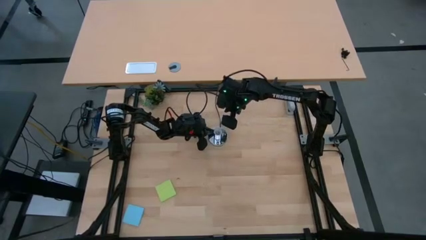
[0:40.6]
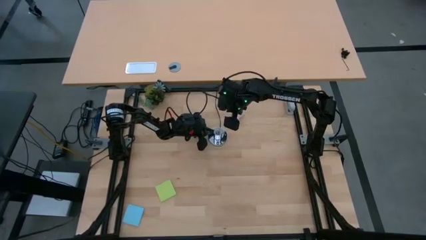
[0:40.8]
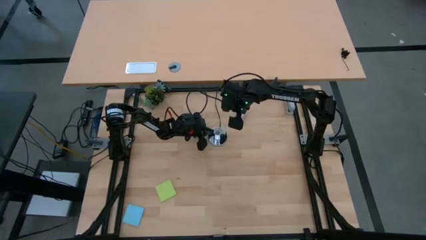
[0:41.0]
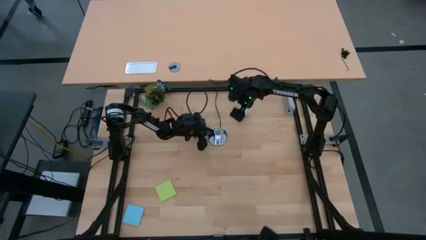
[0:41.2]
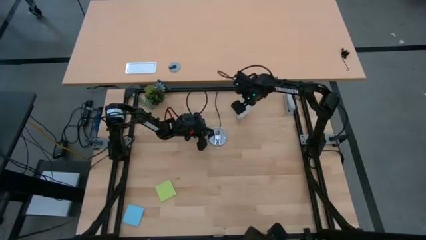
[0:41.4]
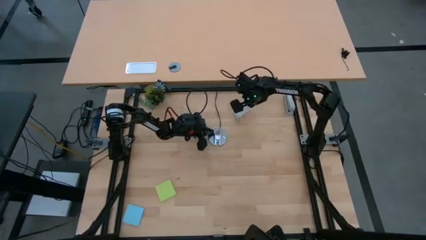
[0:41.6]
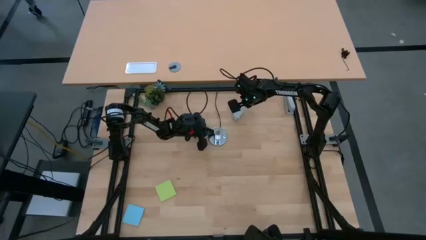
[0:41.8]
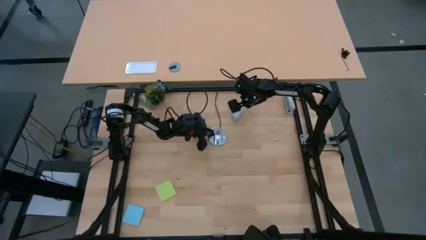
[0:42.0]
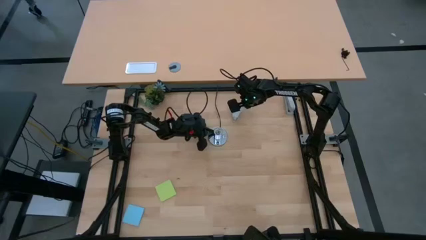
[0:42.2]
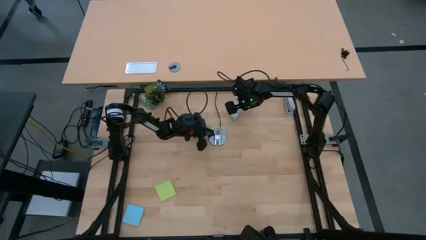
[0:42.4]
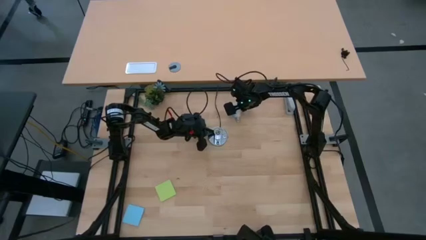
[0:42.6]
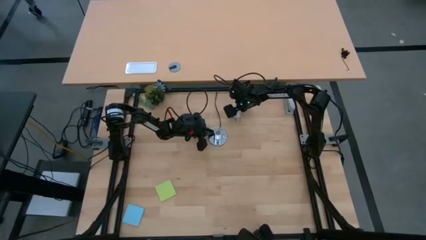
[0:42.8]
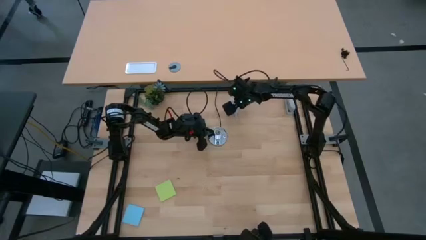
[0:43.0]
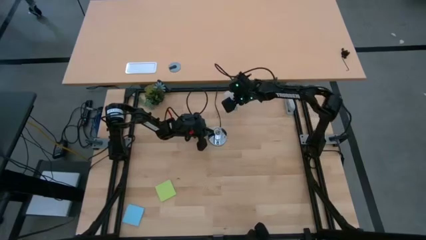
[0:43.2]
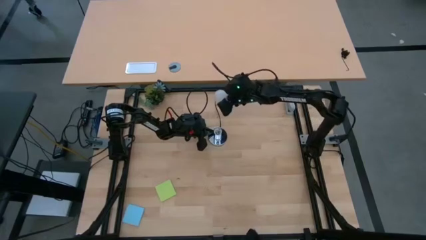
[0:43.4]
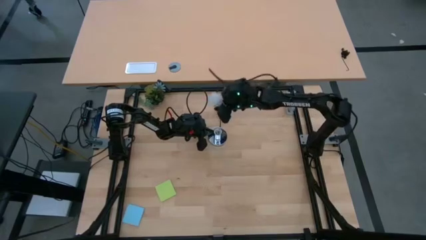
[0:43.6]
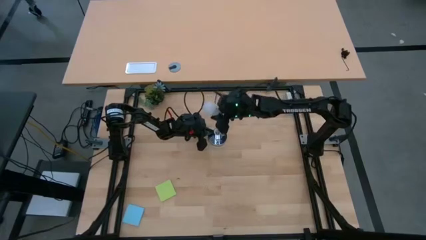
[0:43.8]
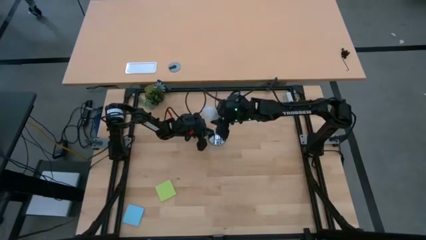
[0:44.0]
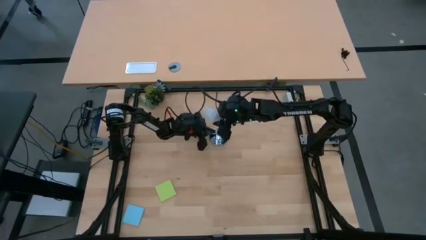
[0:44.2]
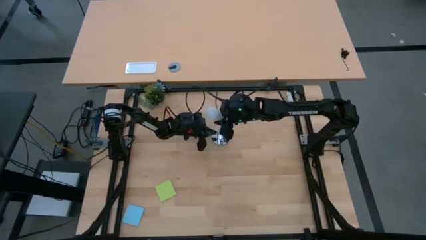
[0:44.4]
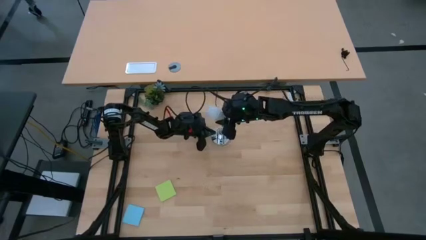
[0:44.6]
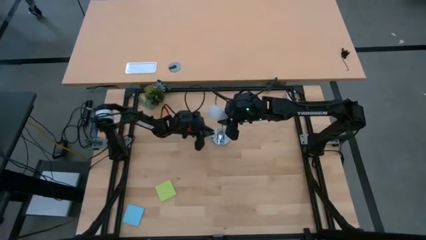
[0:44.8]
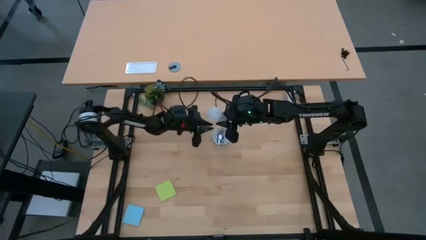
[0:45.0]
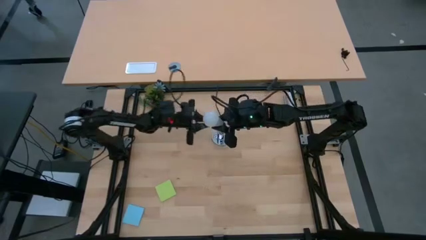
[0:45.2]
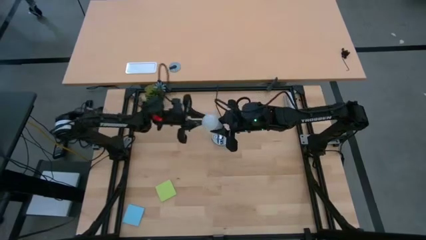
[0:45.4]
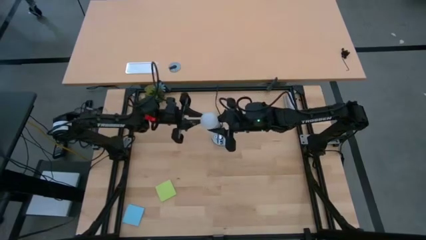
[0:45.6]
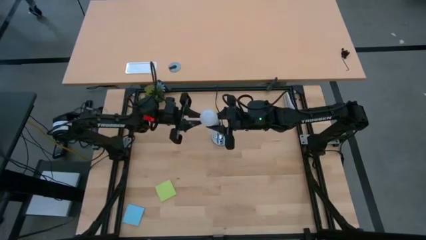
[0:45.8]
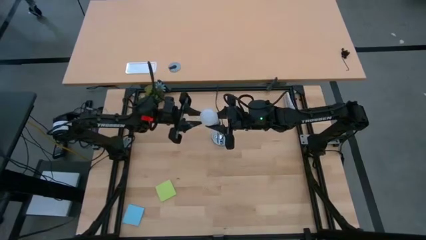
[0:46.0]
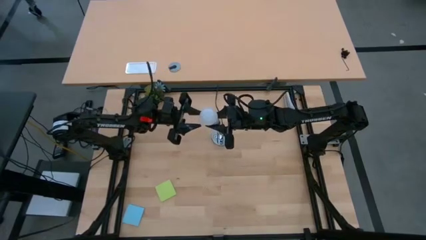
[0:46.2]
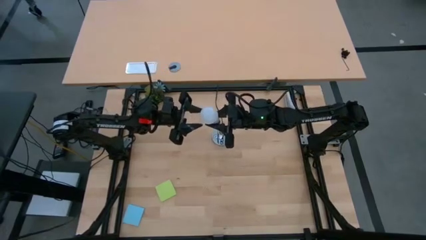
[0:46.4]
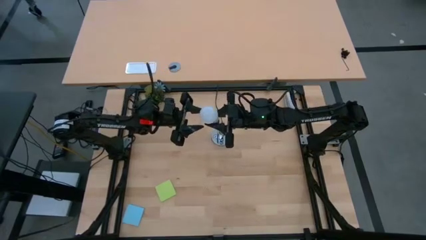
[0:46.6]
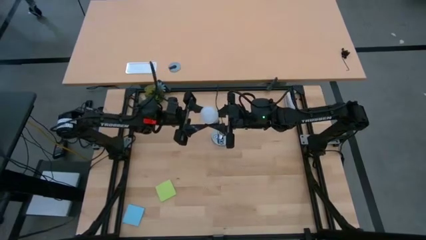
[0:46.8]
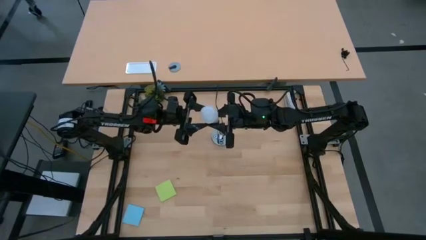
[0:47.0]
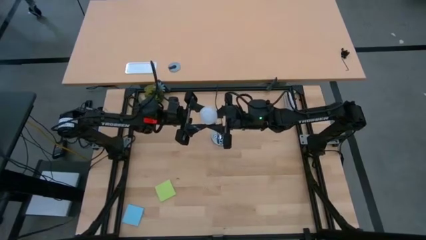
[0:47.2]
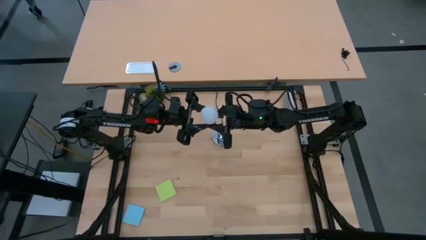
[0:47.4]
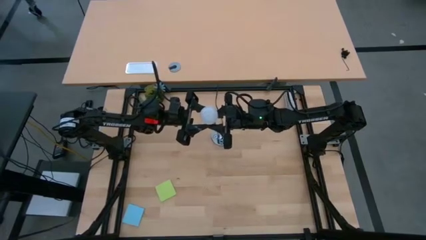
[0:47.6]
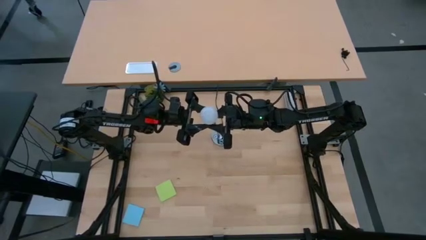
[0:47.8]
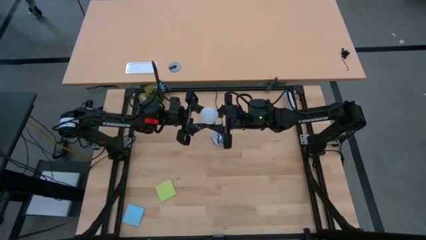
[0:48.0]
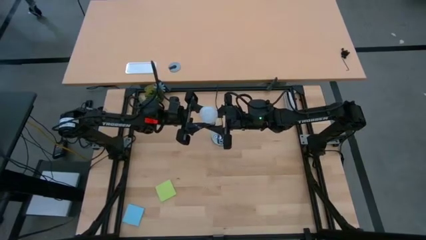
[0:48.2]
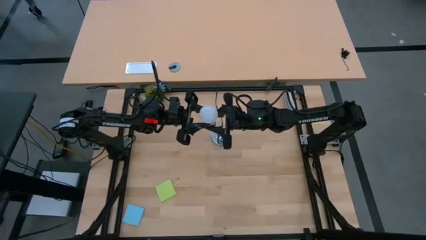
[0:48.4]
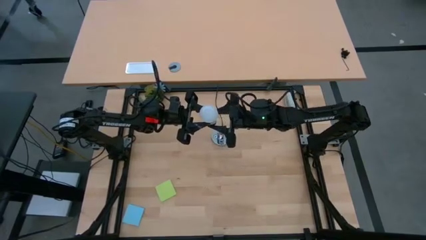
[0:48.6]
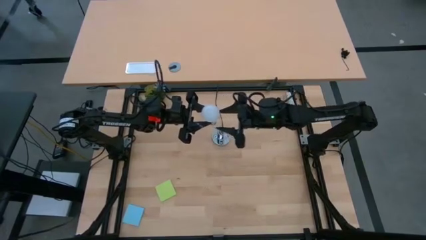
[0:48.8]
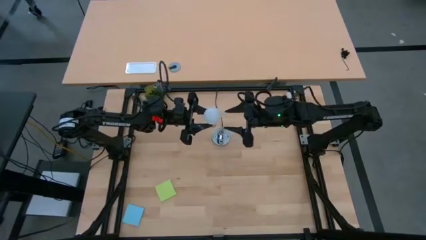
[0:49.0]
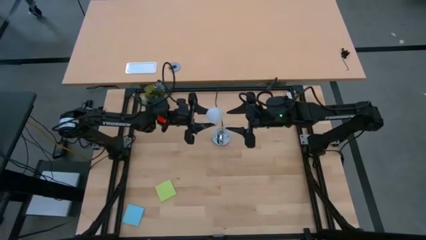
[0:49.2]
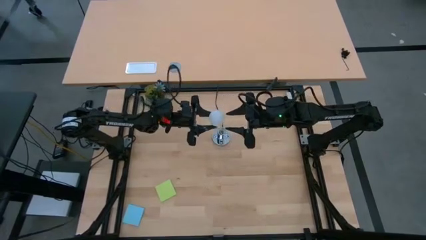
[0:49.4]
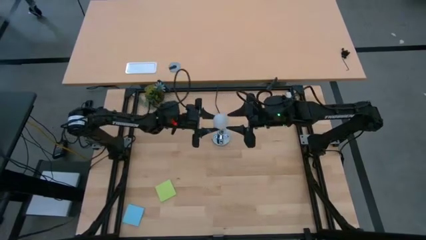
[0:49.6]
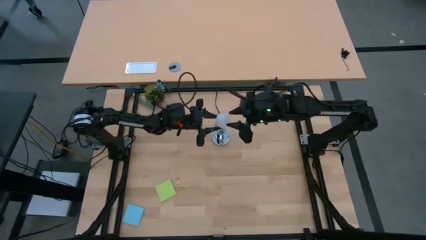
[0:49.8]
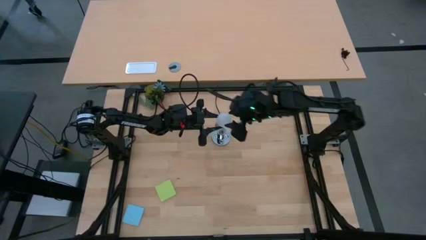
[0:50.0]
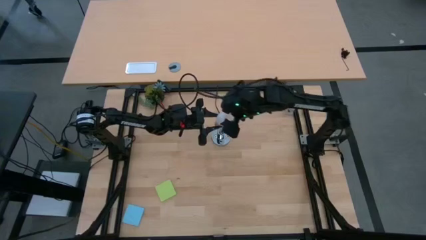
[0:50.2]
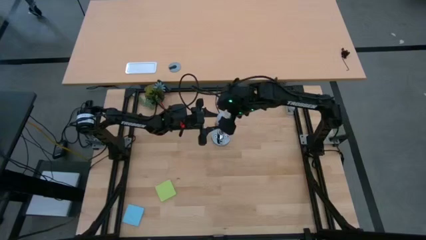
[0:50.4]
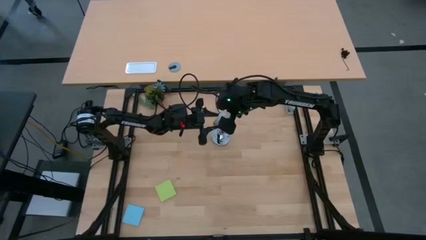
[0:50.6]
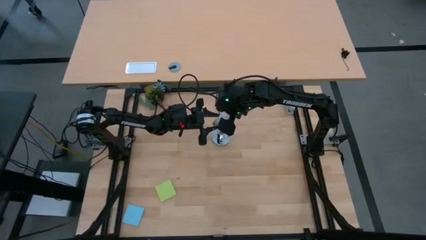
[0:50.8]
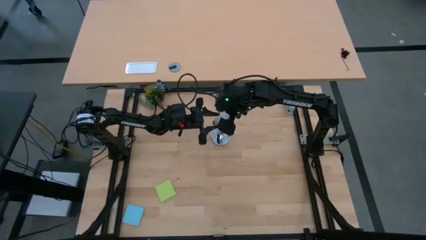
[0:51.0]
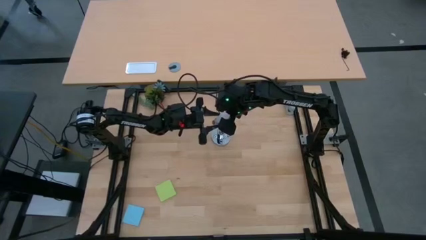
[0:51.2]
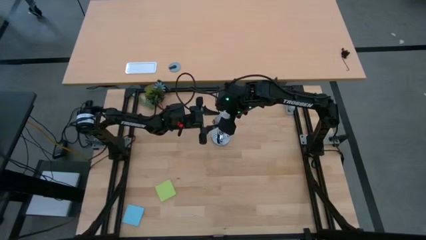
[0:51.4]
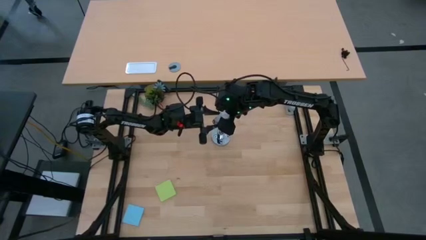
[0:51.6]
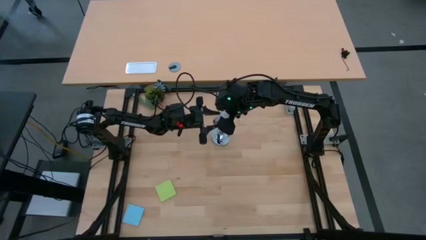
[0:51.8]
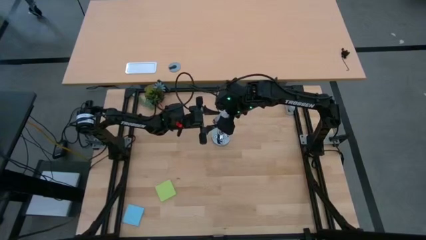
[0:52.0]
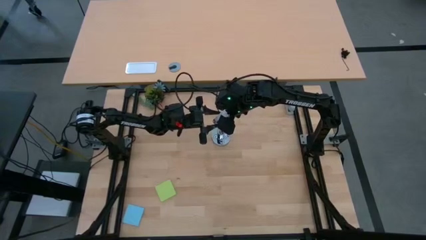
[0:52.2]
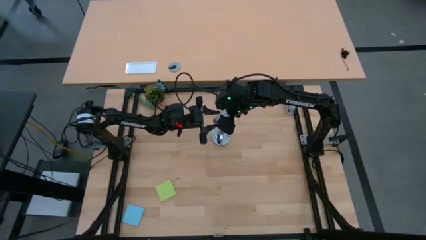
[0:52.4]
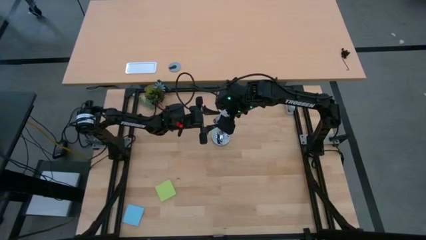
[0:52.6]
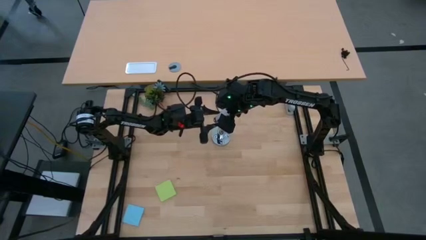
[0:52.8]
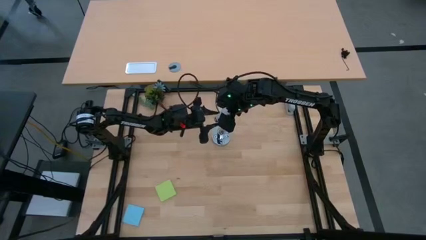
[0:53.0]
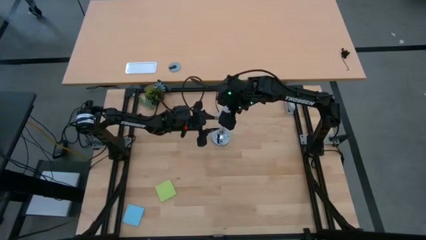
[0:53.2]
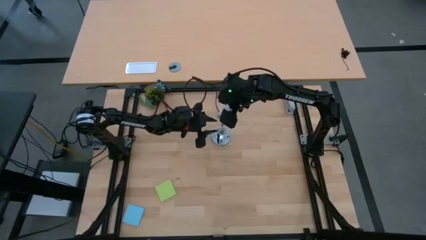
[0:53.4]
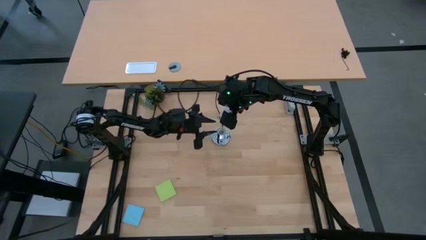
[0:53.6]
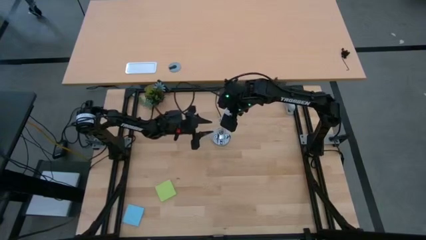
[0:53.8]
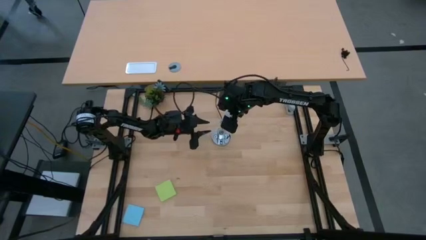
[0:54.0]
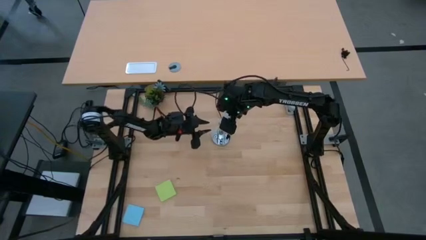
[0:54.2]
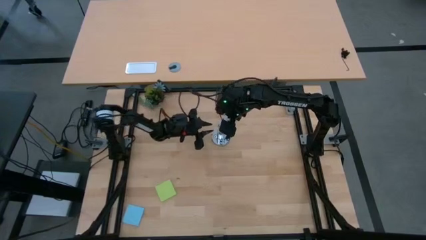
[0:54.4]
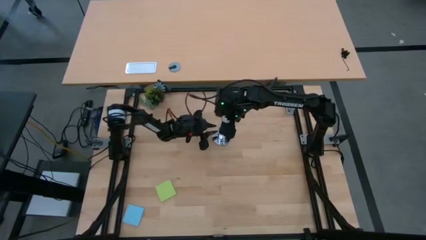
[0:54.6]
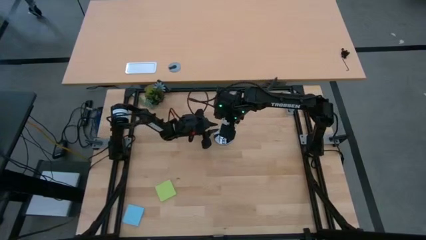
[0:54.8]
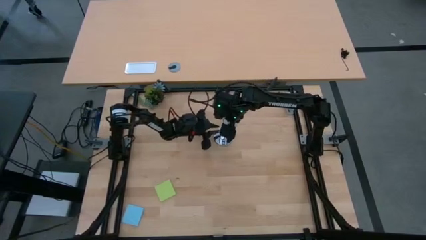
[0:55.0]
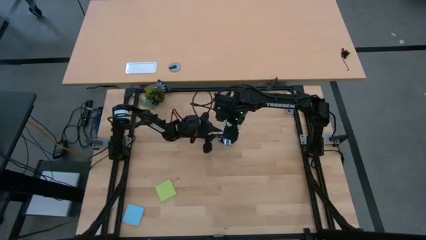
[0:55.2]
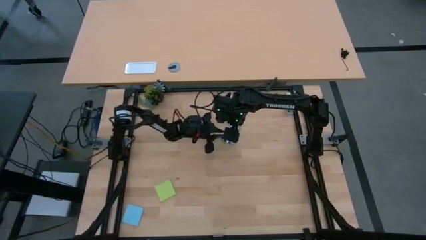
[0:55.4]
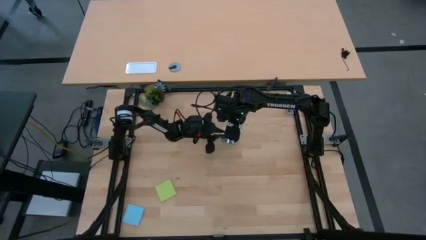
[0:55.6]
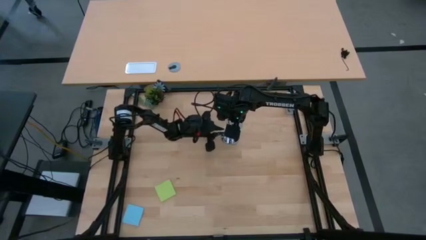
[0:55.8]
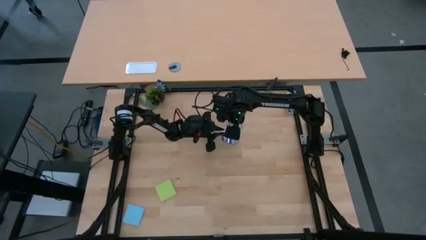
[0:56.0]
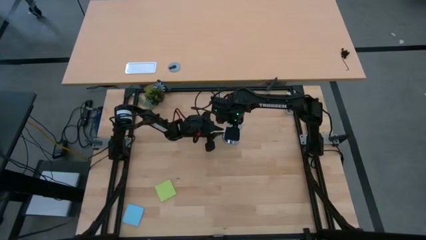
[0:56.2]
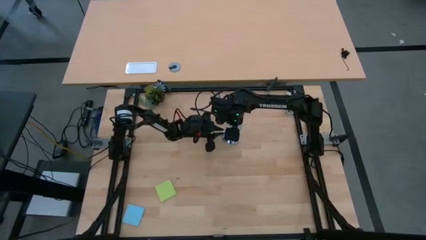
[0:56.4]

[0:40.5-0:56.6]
Task: Screw lightbulb
Insert the lightbulb into the lamp

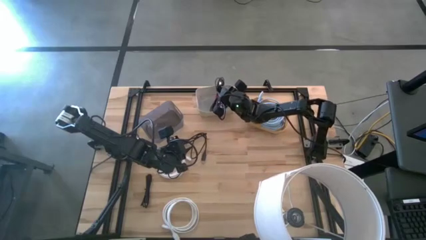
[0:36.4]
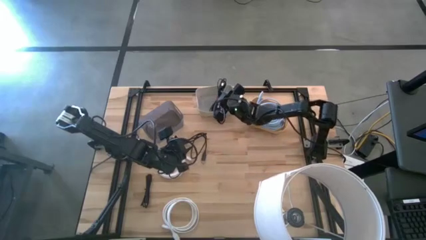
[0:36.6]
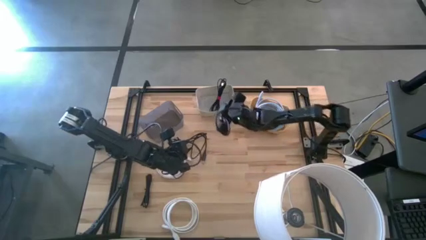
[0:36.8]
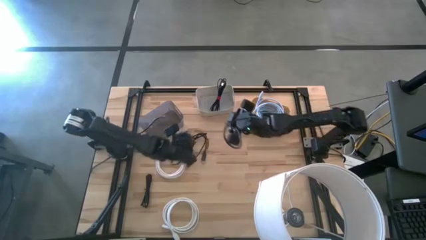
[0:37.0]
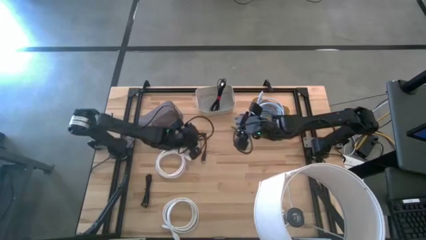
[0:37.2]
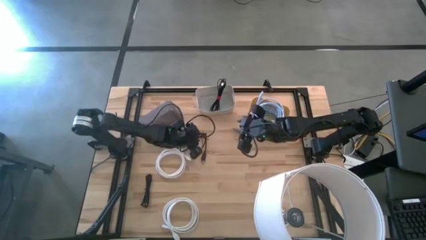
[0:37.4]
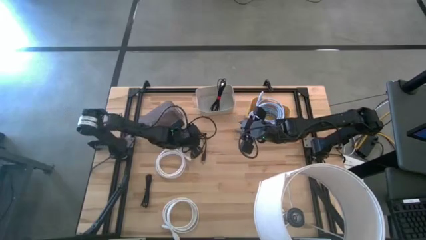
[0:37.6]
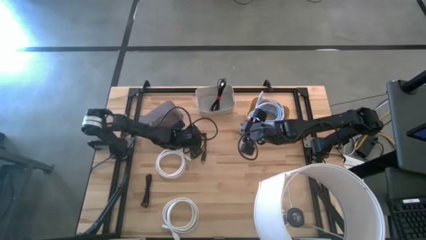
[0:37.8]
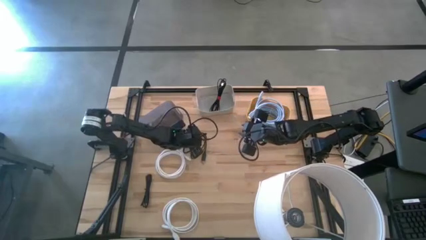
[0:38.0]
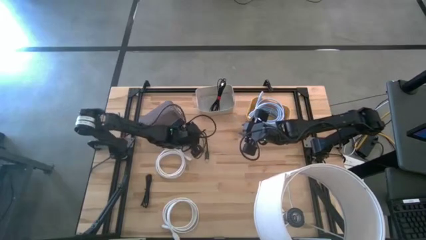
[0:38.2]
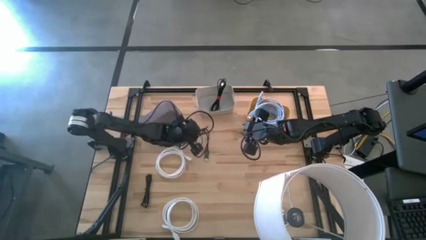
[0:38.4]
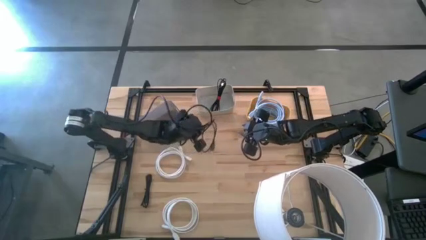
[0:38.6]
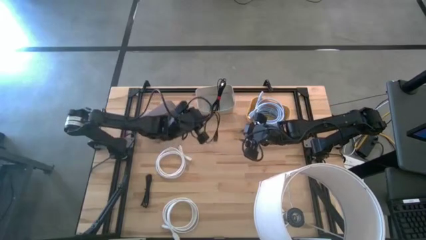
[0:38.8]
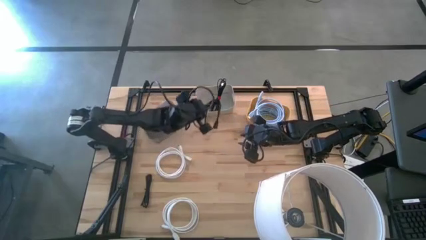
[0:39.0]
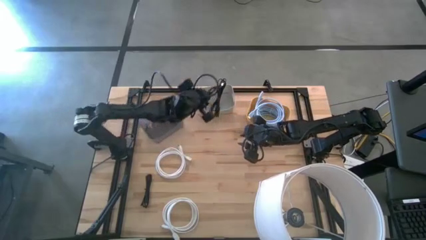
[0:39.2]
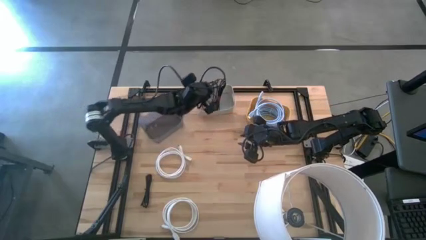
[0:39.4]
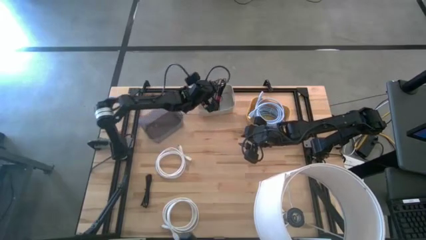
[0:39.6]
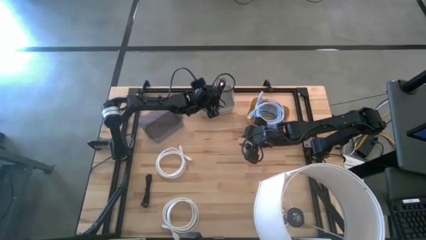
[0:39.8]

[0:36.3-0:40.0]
Task: Pick & Place USB Port
Put the top black usb cable into the white bin
